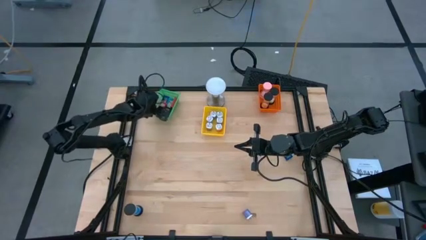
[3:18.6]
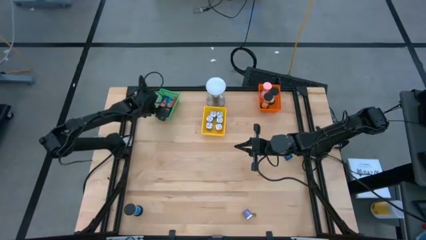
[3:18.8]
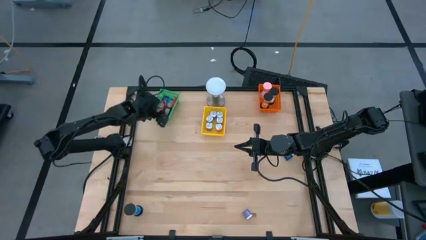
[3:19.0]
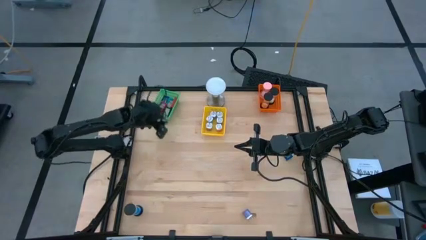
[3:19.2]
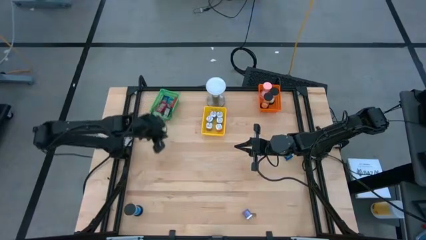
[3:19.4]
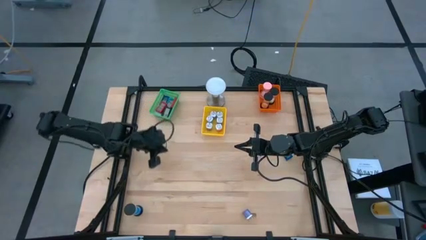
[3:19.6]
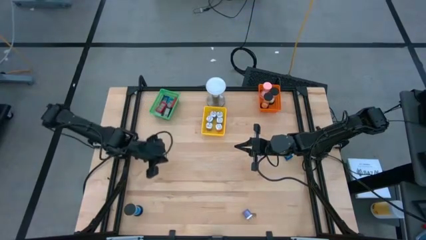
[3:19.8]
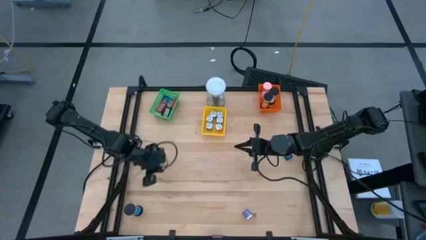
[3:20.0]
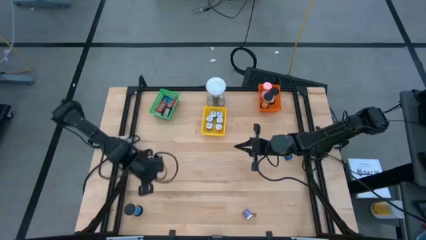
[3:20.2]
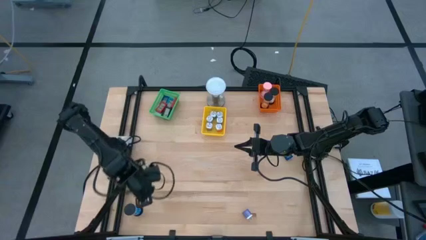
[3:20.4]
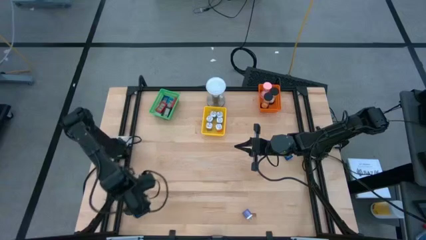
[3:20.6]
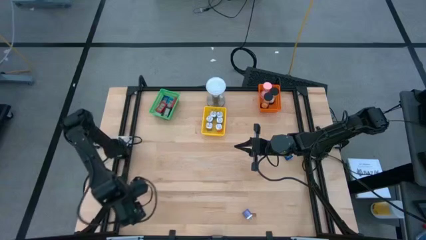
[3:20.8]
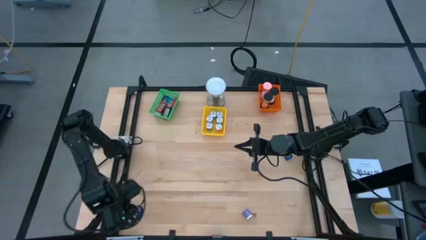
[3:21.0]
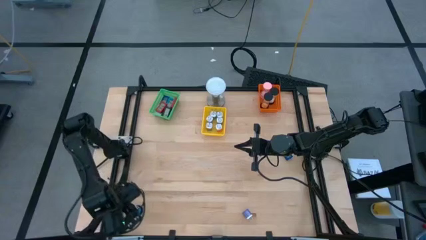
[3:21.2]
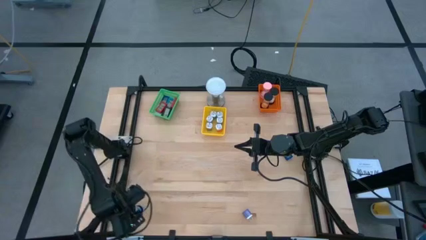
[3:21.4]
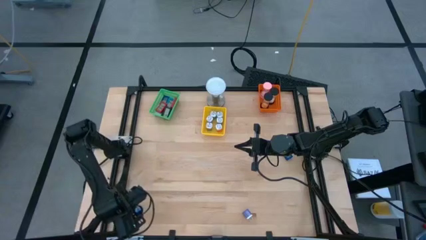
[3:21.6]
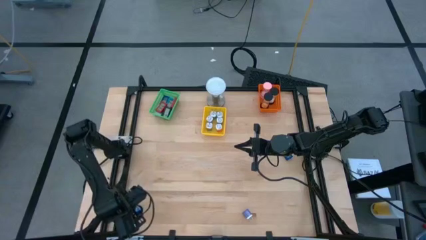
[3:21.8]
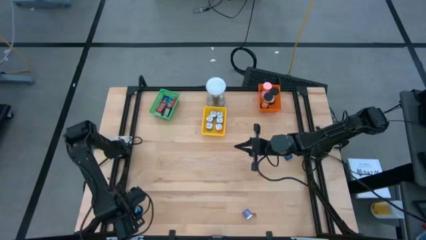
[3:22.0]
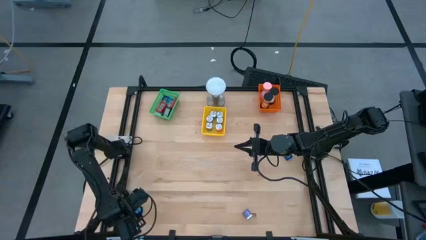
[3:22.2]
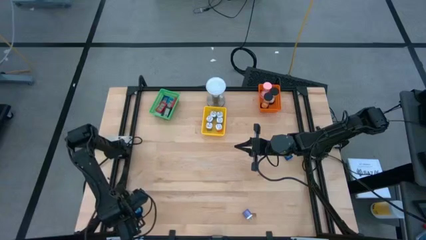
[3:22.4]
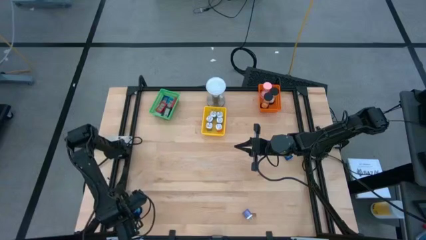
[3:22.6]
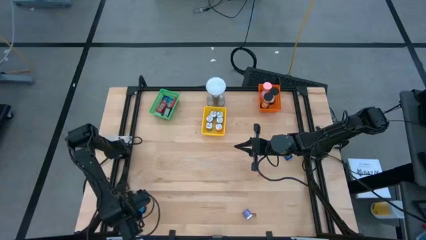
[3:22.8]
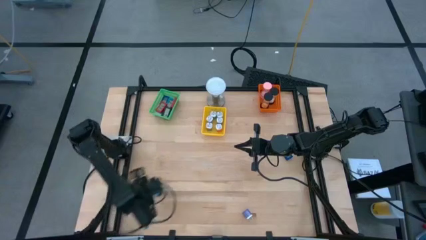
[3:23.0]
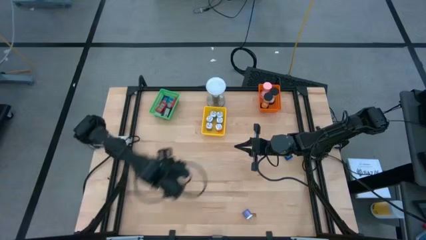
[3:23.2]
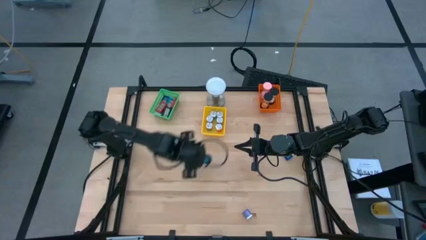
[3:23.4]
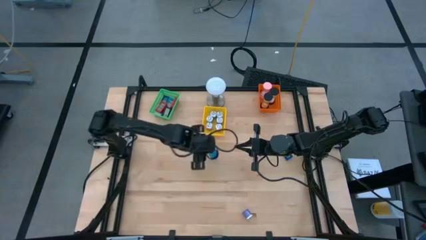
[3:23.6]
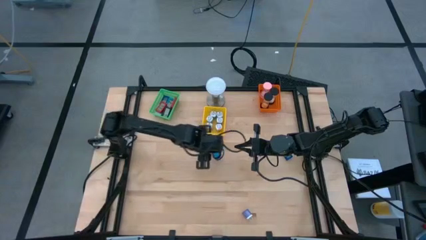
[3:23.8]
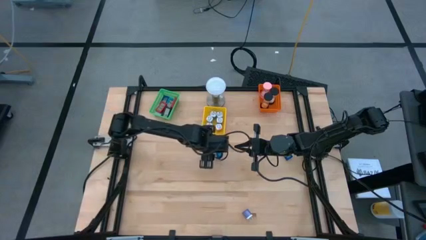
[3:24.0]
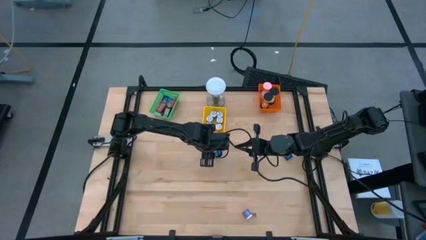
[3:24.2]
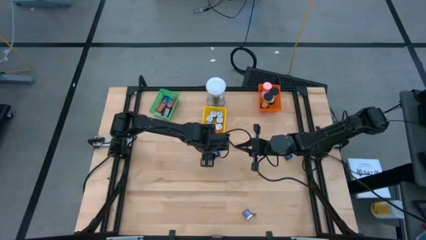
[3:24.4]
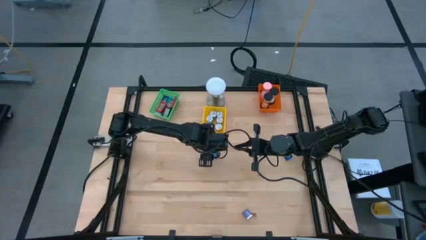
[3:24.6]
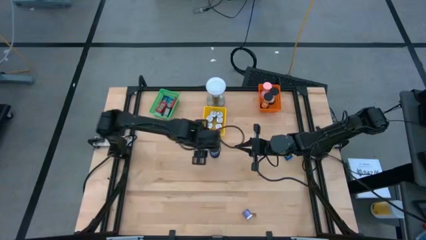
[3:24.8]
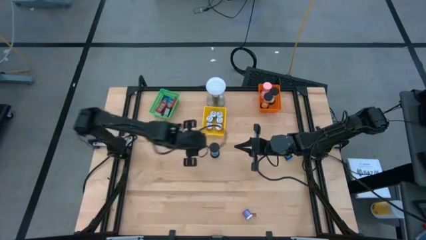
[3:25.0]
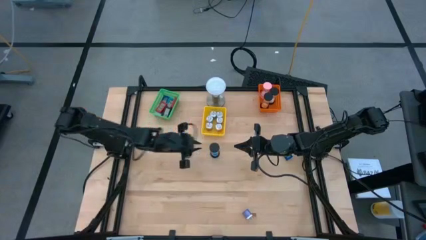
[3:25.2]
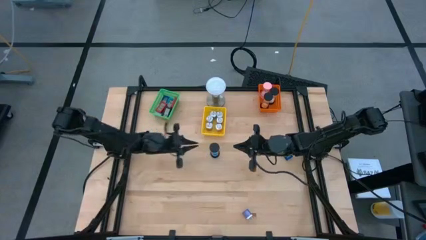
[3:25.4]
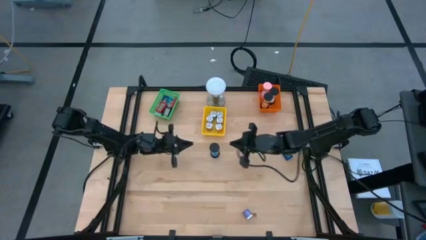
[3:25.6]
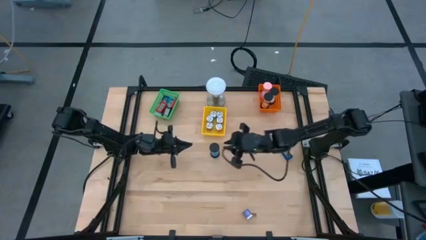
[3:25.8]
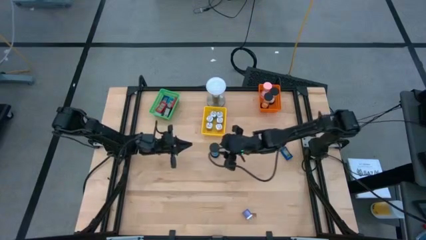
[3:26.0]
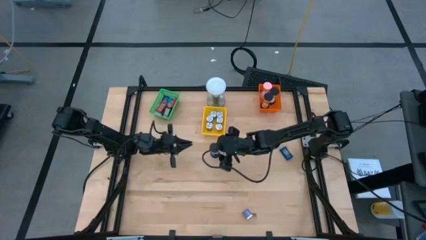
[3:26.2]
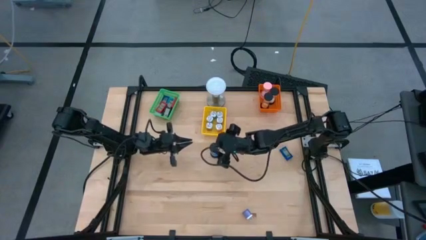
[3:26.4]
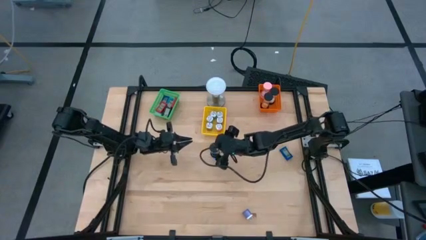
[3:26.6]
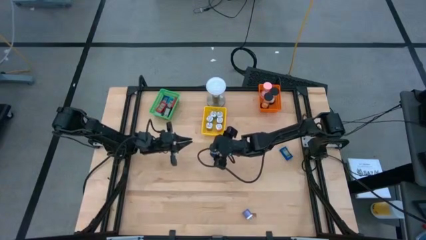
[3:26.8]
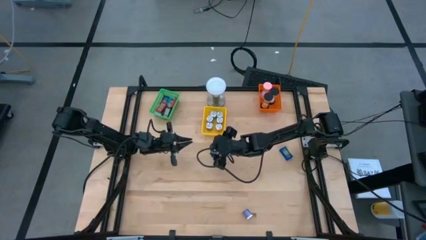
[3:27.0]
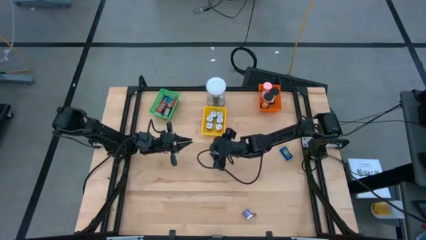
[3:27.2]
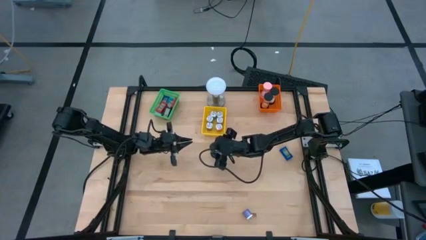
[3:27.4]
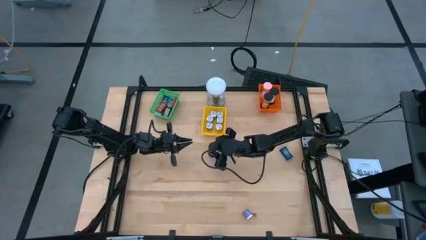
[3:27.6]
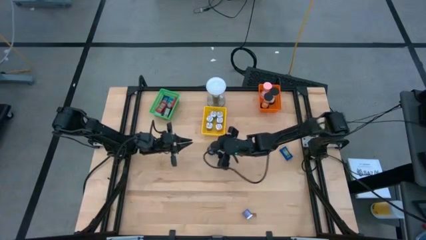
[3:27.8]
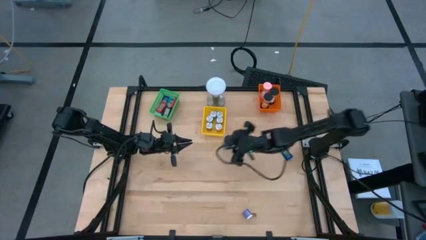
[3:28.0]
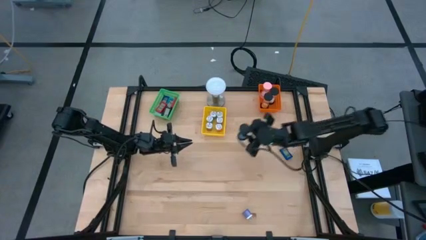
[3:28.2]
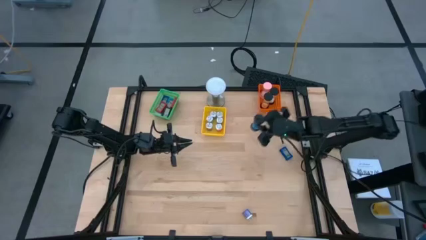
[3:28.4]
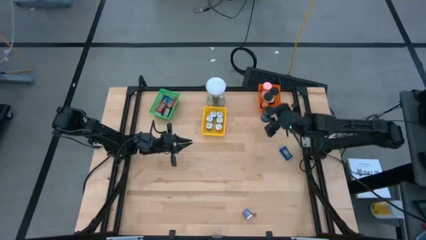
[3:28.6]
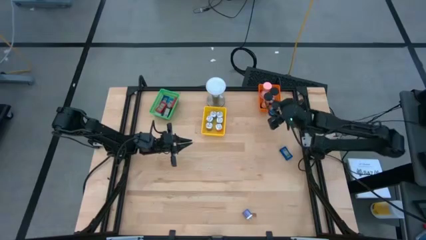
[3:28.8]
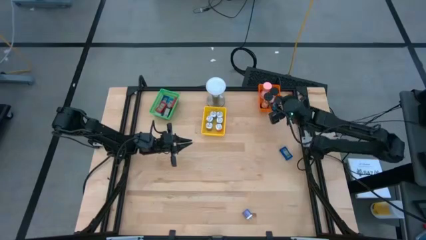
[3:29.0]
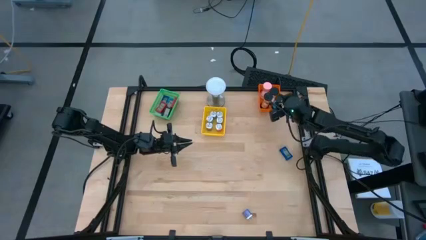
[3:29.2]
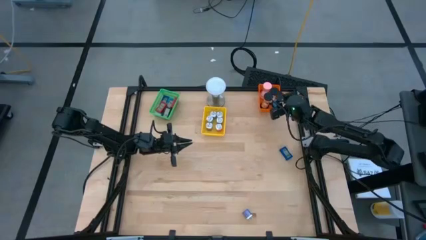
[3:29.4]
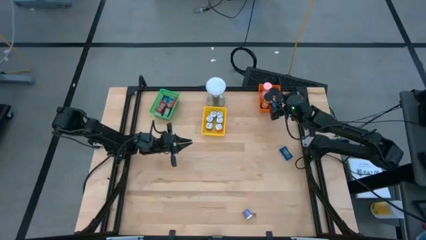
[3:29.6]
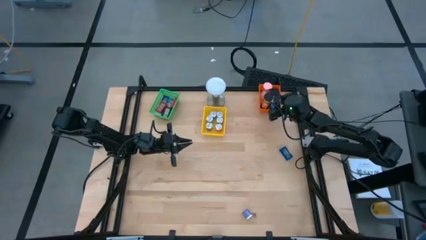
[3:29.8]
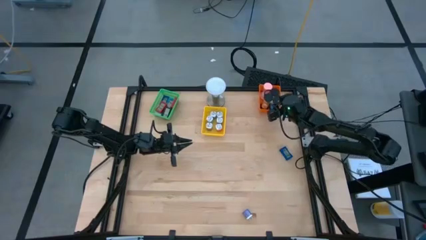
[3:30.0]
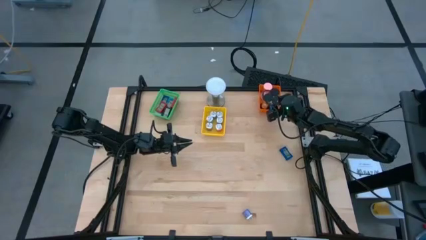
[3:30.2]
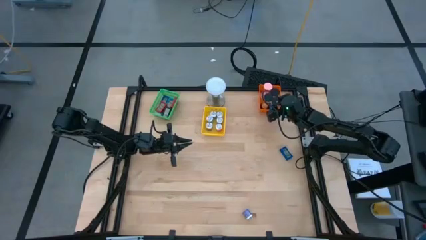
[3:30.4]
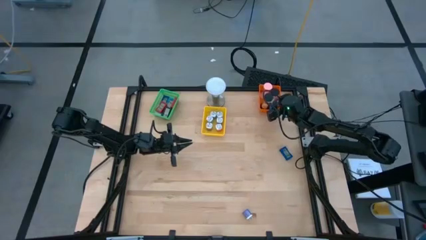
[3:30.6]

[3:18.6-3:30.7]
Task: Pick & Place Office items
Put the black blue hourglass into the orange bin
